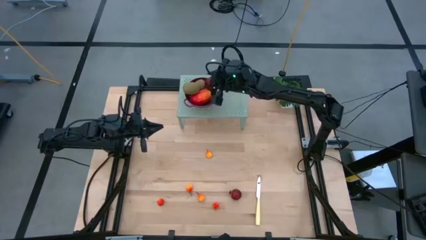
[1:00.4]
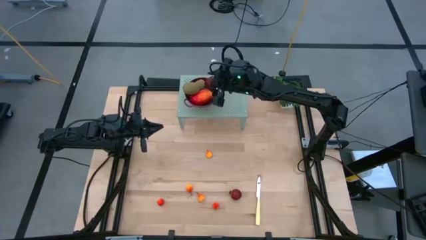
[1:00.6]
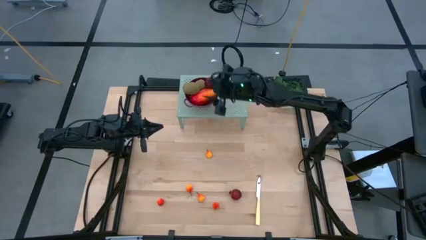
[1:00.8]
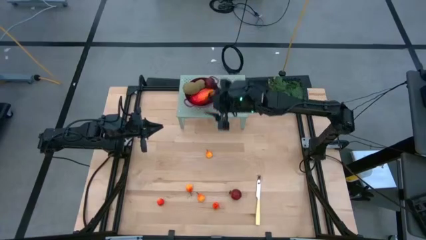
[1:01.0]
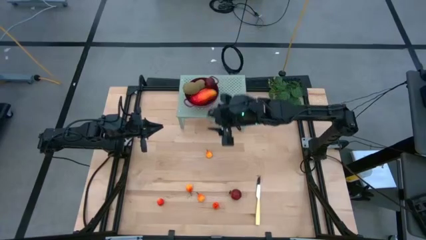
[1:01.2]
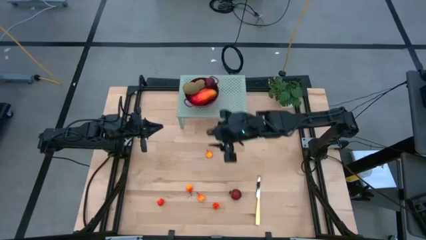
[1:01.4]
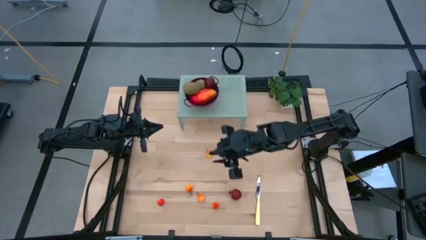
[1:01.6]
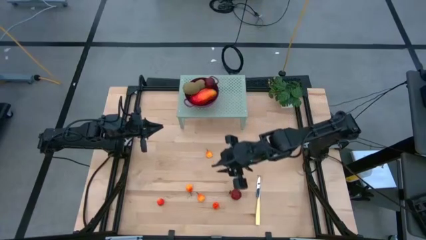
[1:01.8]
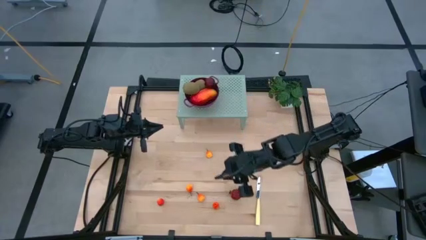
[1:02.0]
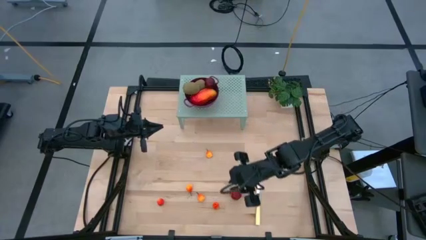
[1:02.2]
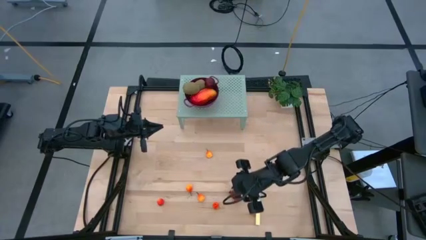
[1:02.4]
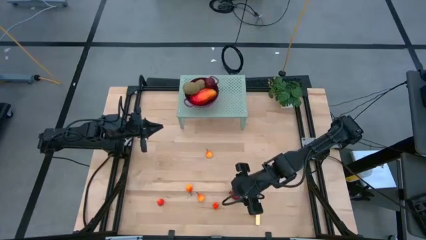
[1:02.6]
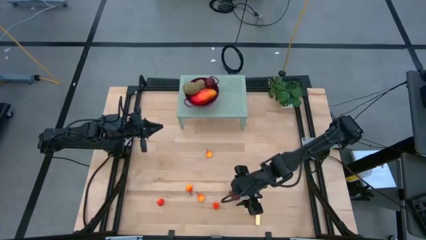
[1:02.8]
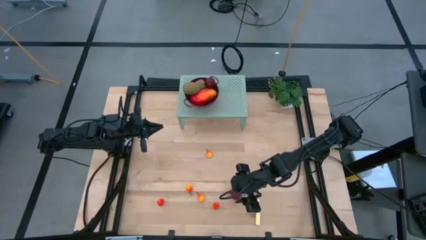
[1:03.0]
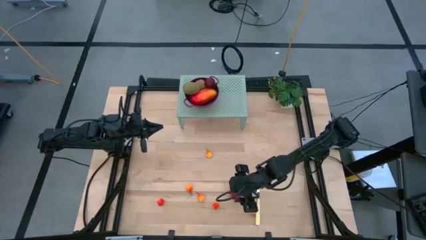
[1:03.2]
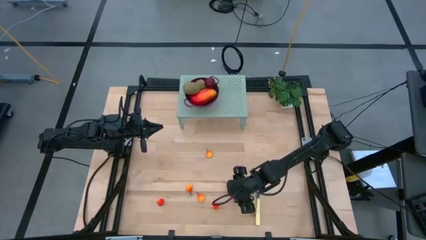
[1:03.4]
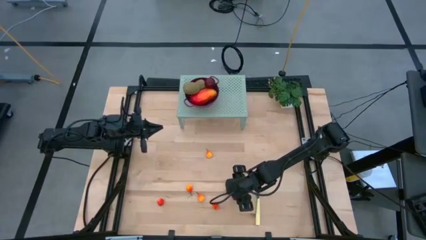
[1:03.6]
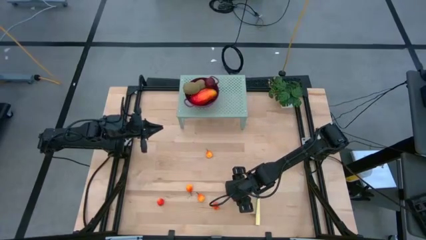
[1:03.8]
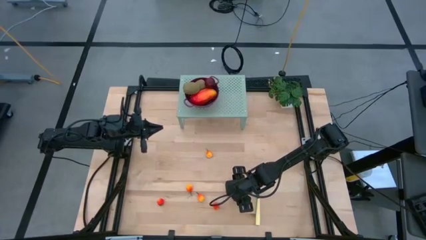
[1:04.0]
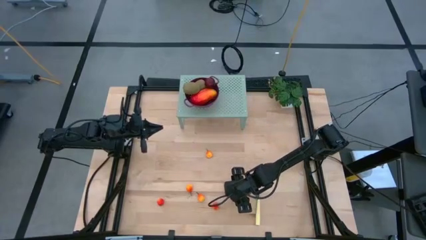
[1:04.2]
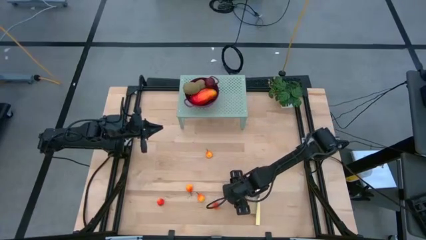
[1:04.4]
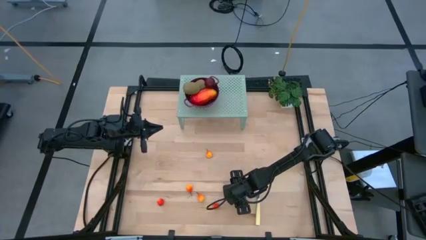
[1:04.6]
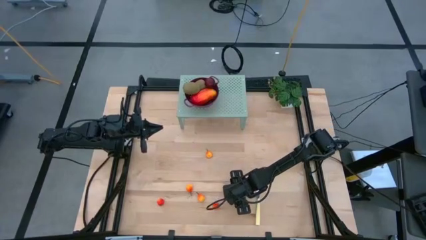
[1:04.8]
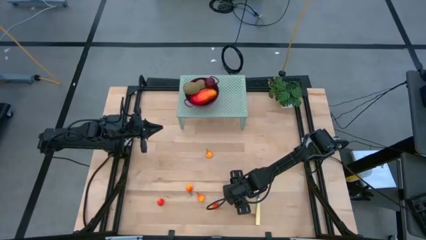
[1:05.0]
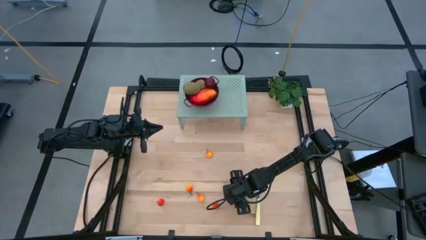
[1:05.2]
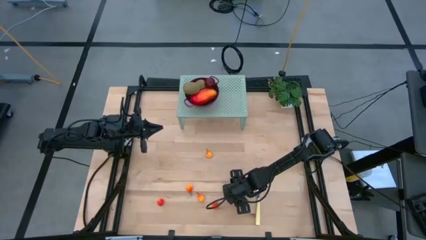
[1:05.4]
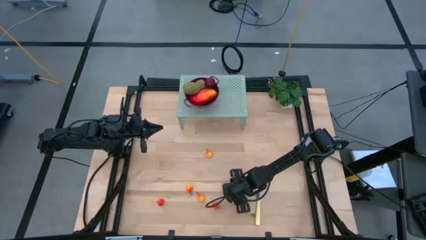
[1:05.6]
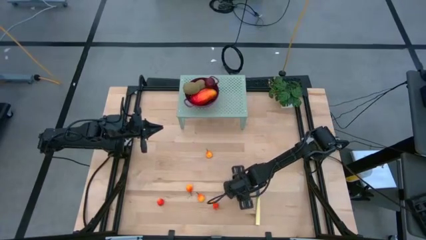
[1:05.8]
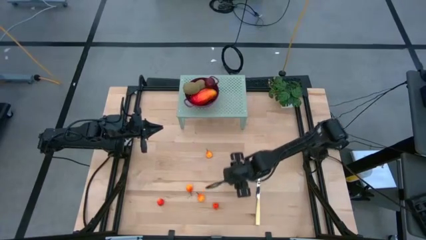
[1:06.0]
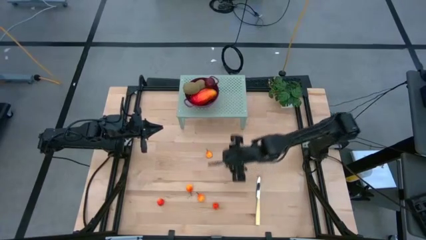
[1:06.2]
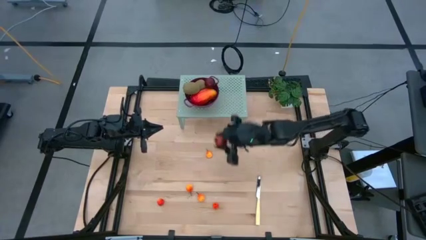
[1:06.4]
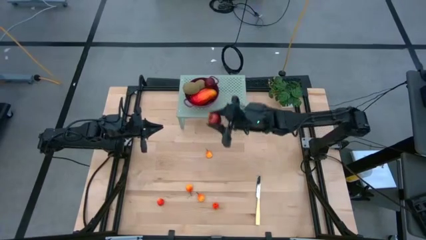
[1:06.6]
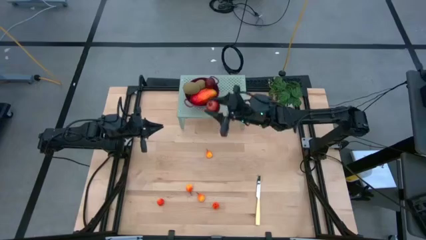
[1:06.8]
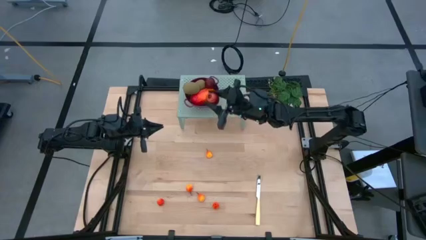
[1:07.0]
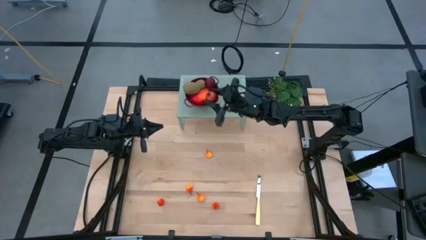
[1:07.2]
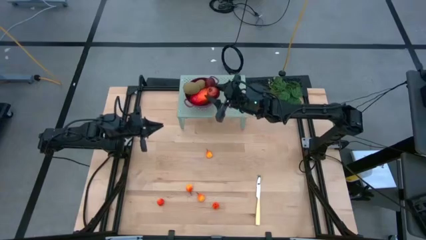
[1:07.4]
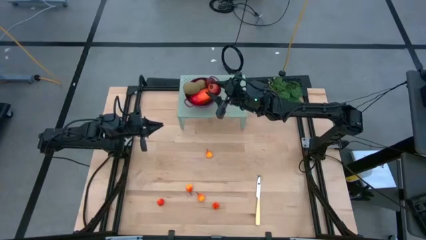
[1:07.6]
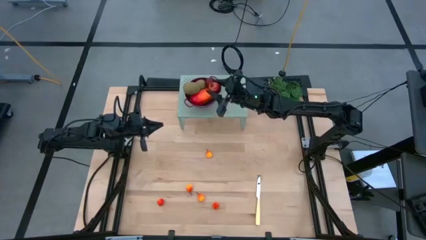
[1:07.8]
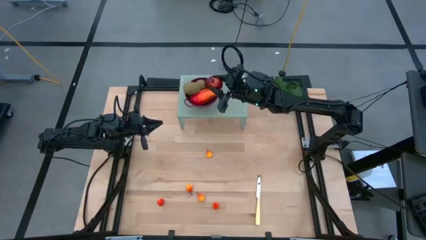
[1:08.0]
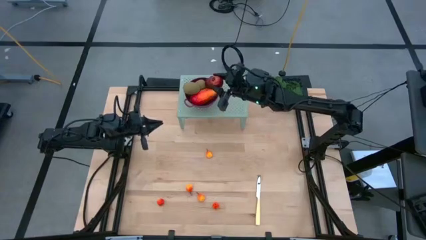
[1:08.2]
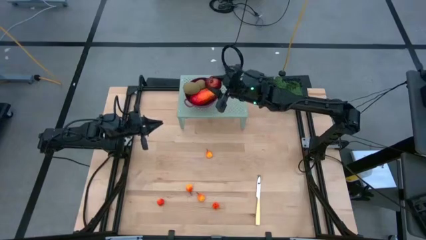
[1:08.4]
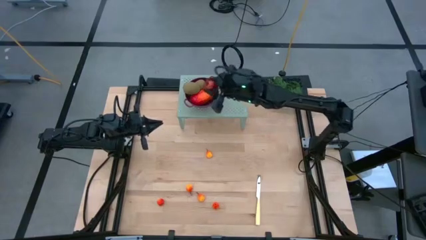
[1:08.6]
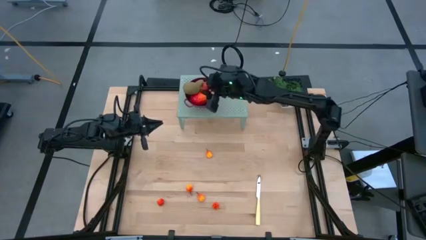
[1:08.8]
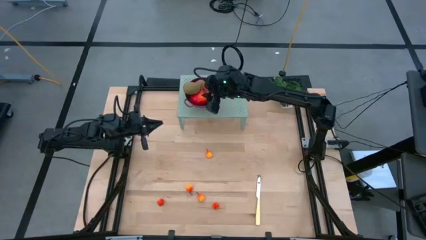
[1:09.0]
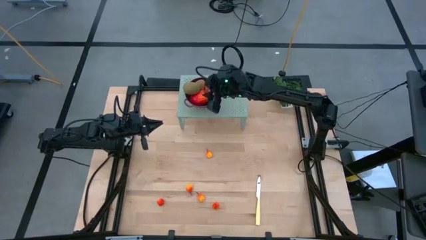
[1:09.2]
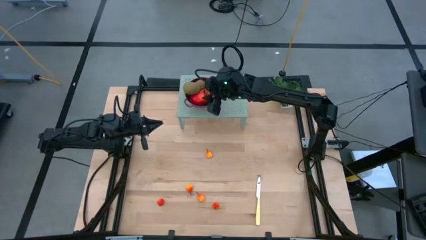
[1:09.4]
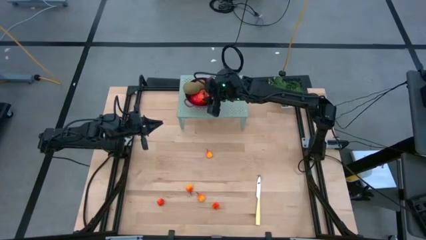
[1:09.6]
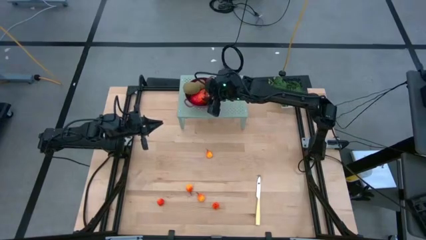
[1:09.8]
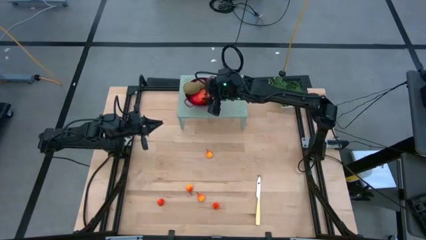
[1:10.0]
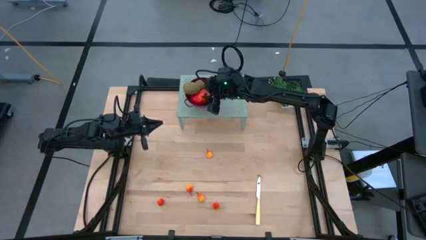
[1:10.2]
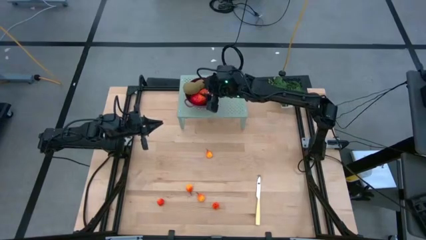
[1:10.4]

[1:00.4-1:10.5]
Task: Pick & Place Fruit
Put the red pomegranate in the red strainer bowl on the shelf

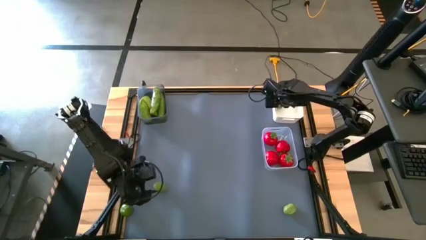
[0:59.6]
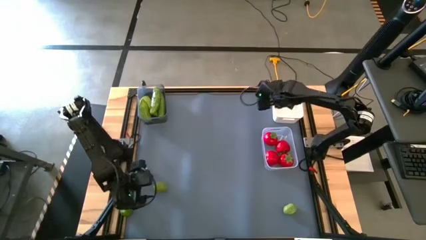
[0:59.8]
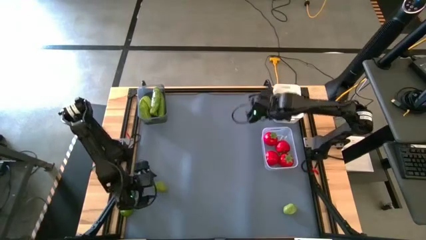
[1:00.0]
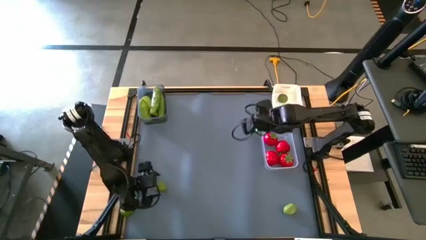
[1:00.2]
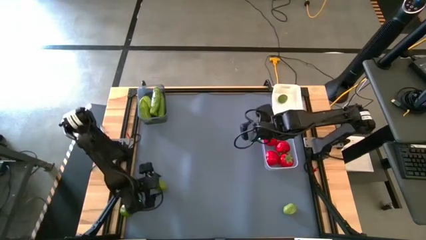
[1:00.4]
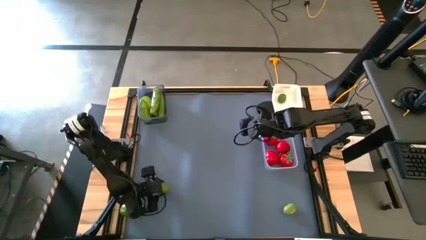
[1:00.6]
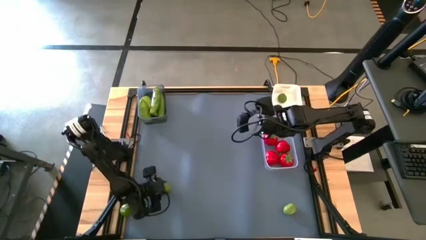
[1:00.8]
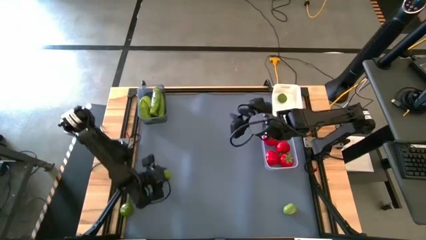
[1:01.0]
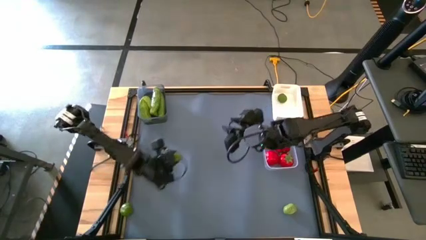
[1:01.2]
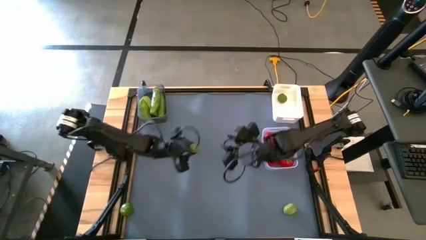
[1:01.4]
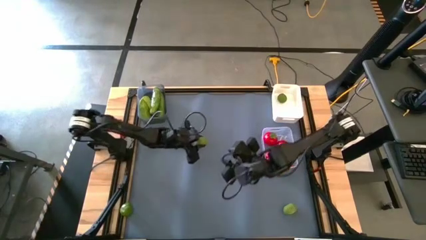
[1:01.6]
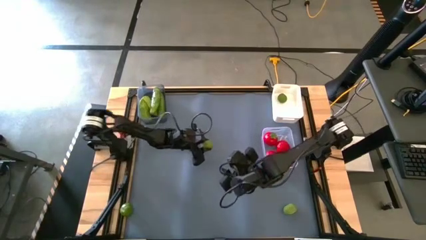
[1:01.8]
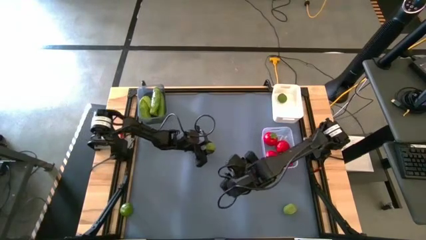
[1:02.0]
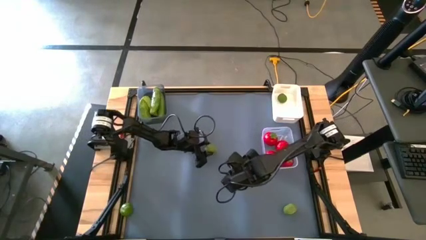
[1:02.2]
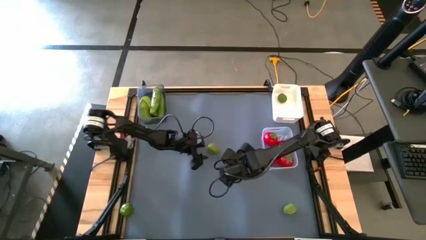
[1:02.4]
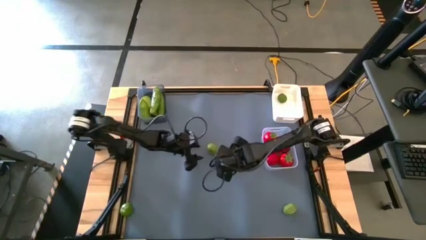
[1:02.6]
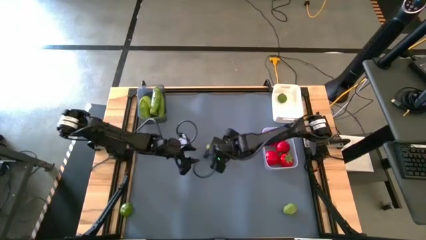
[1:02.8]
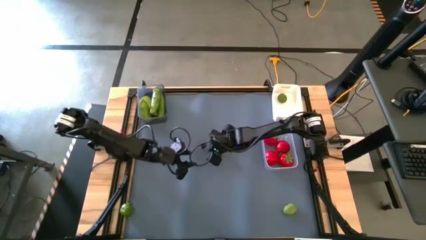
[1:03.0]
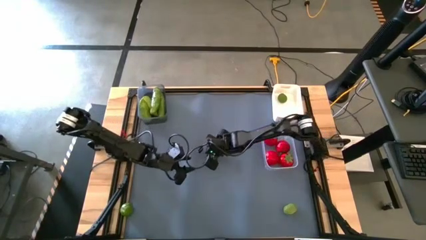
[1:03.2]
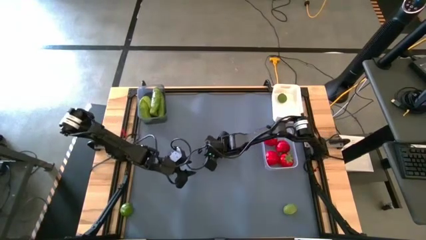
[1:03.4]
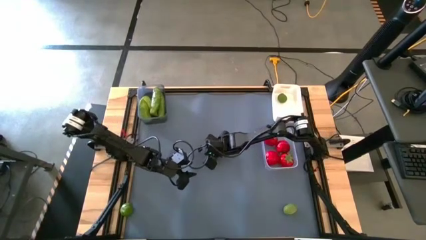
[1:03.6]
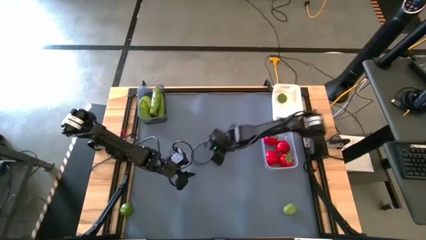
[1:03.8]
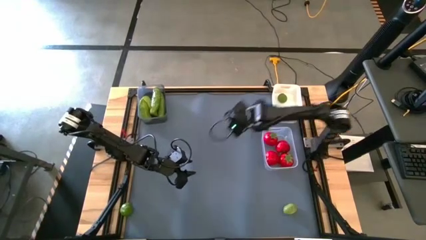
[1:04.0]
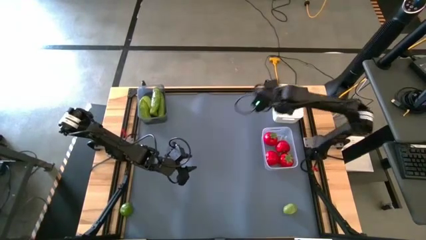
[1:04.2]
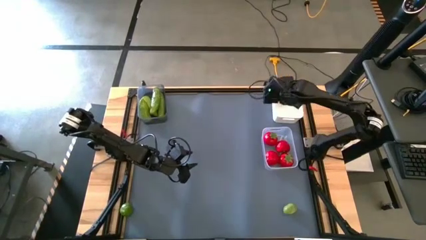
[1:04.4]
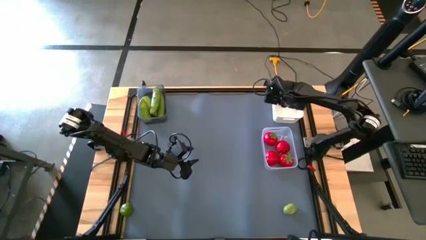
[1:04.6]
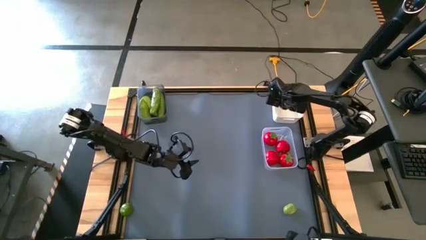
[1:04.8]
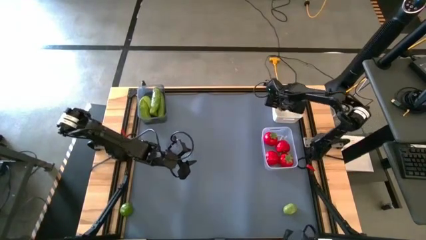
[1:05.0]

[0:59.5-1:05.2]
Task: Sort produce into baskets
Put the lime into the white bin
